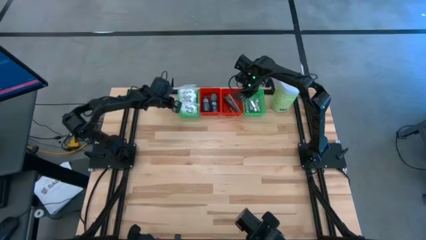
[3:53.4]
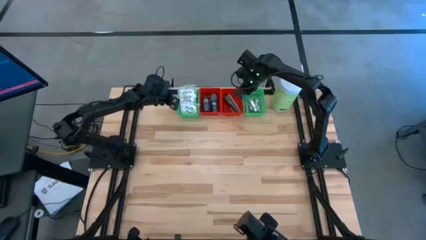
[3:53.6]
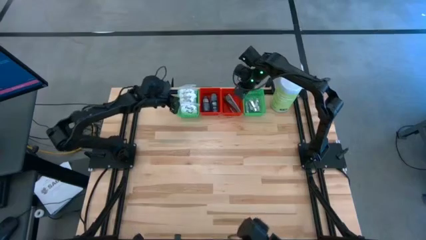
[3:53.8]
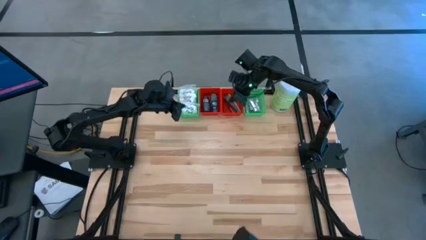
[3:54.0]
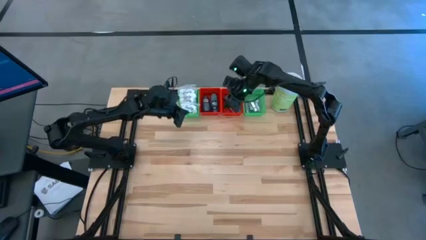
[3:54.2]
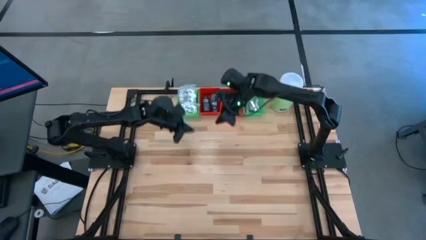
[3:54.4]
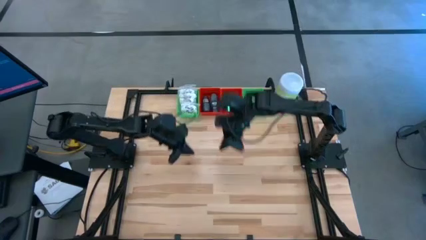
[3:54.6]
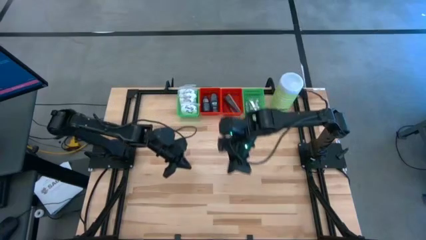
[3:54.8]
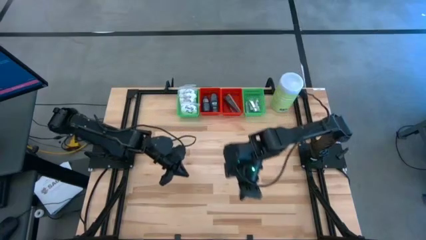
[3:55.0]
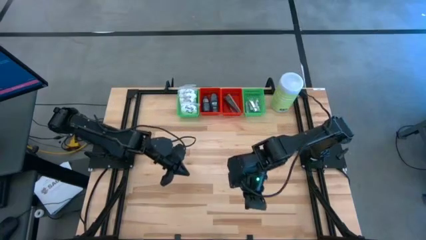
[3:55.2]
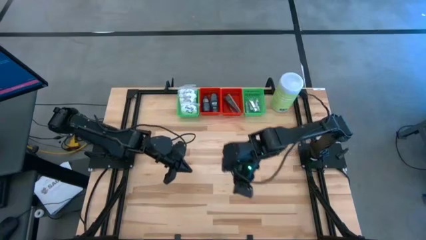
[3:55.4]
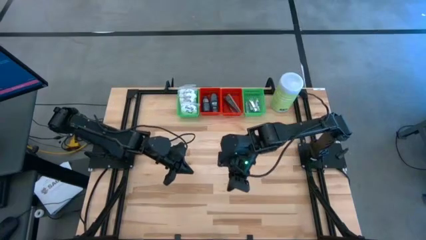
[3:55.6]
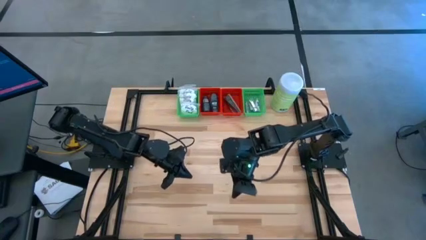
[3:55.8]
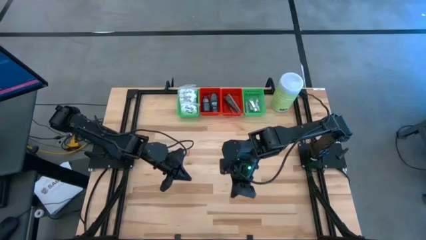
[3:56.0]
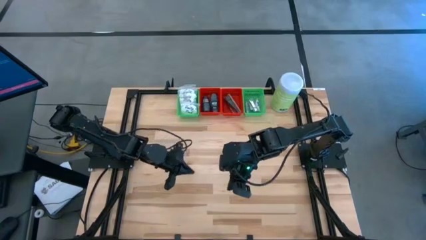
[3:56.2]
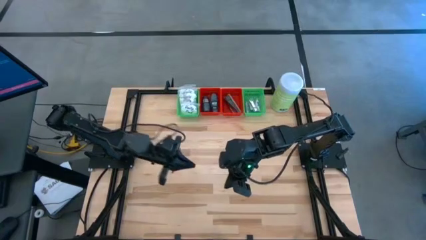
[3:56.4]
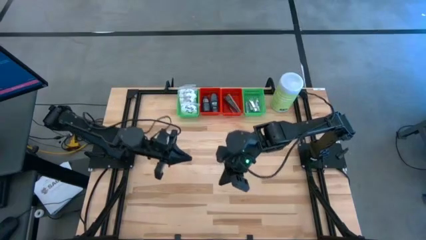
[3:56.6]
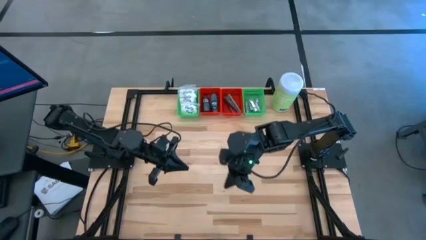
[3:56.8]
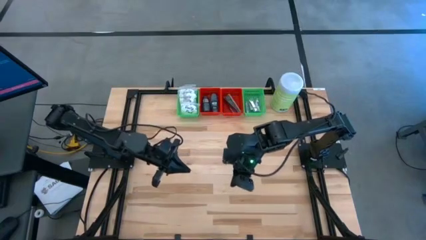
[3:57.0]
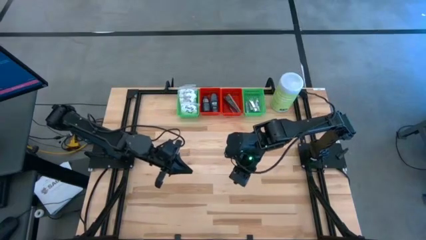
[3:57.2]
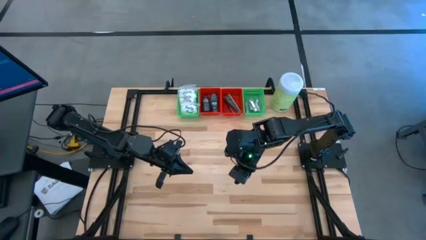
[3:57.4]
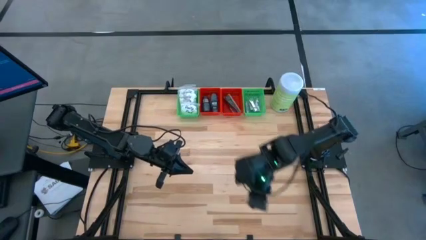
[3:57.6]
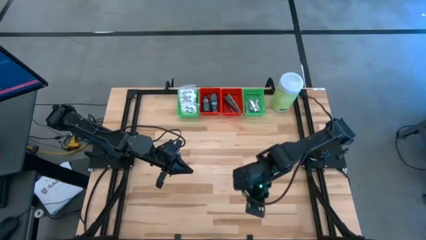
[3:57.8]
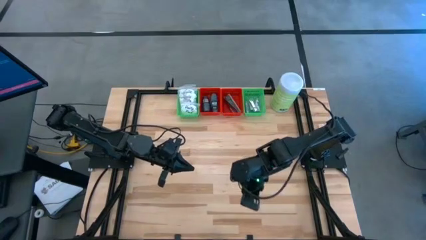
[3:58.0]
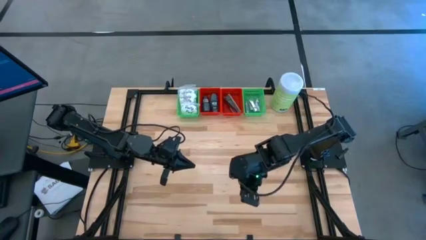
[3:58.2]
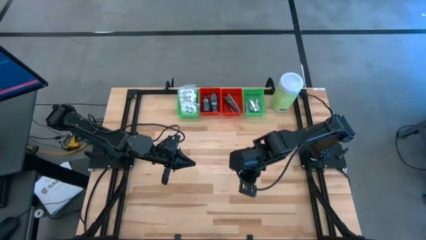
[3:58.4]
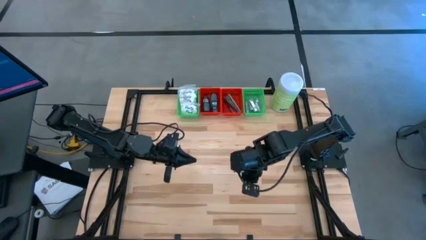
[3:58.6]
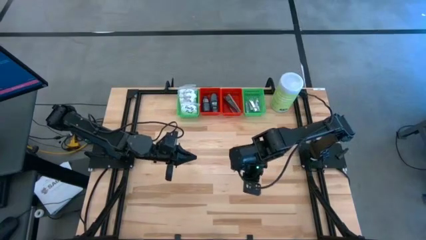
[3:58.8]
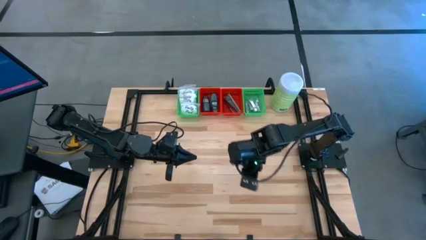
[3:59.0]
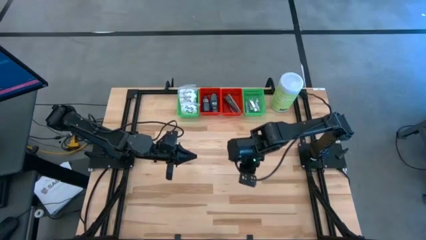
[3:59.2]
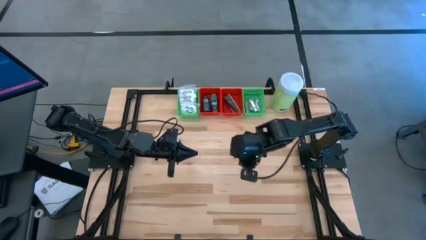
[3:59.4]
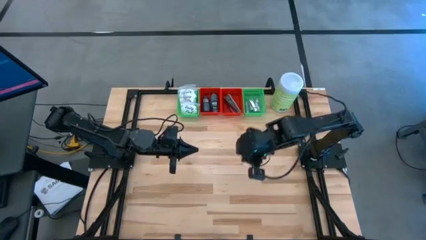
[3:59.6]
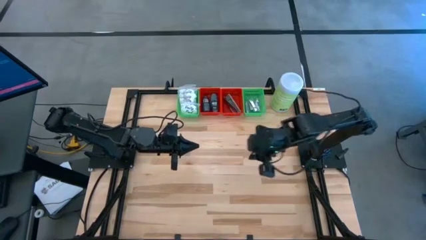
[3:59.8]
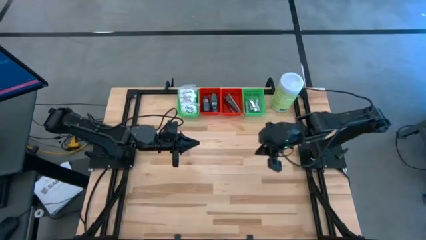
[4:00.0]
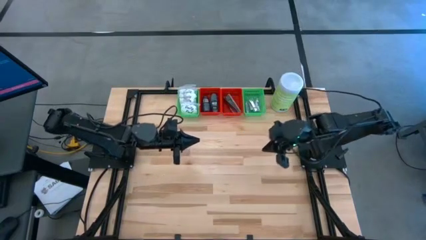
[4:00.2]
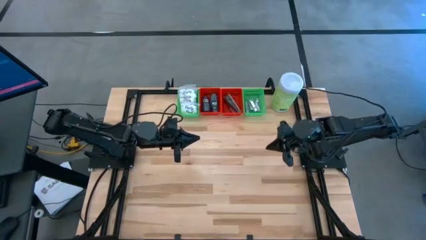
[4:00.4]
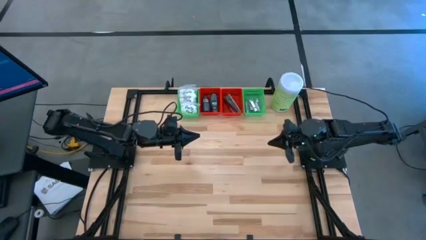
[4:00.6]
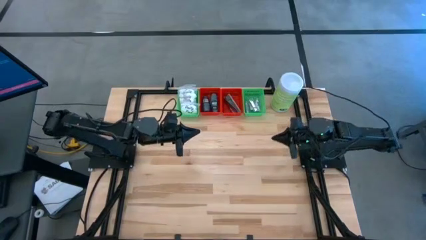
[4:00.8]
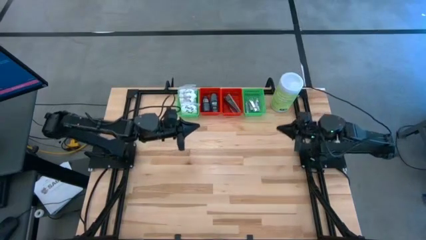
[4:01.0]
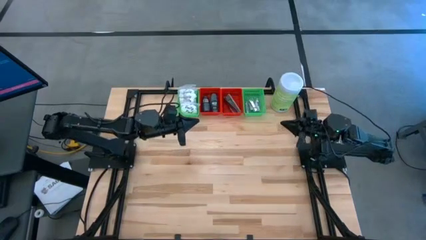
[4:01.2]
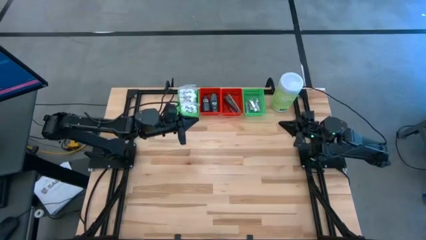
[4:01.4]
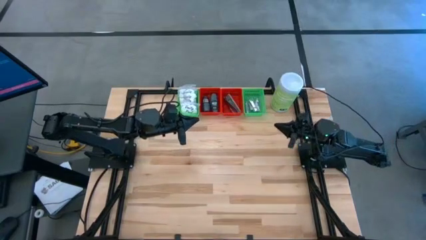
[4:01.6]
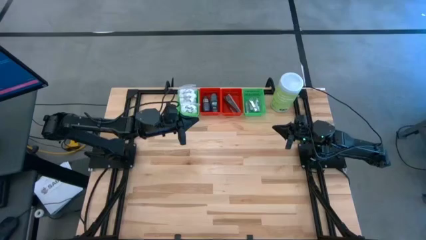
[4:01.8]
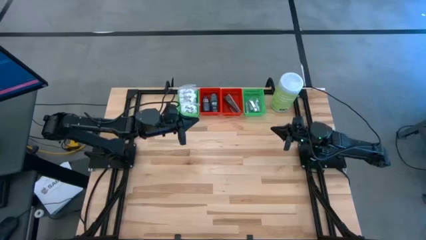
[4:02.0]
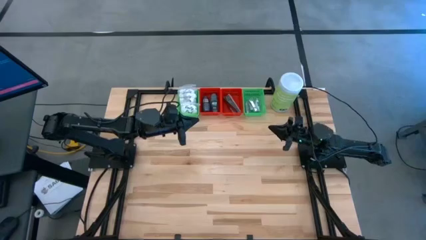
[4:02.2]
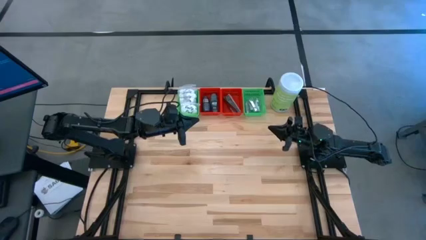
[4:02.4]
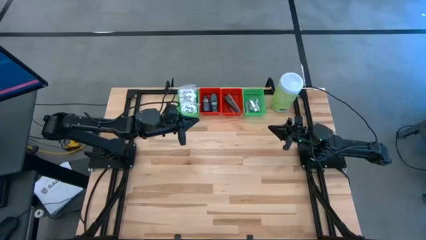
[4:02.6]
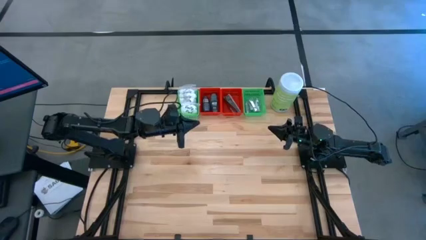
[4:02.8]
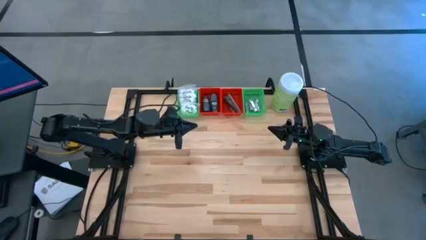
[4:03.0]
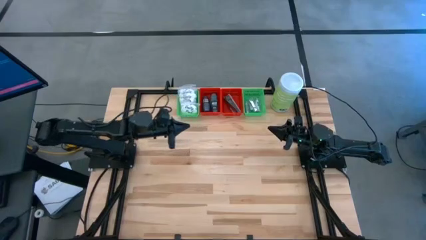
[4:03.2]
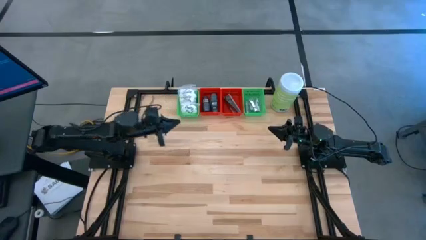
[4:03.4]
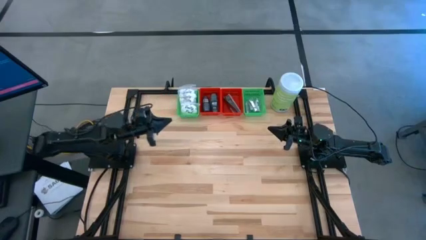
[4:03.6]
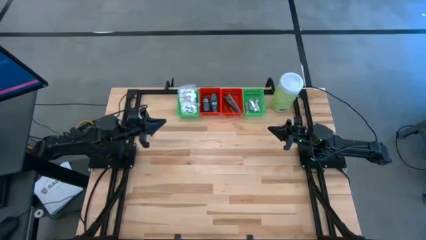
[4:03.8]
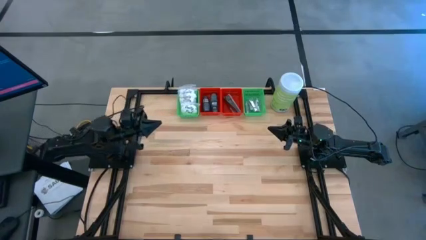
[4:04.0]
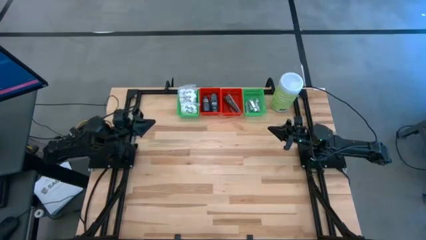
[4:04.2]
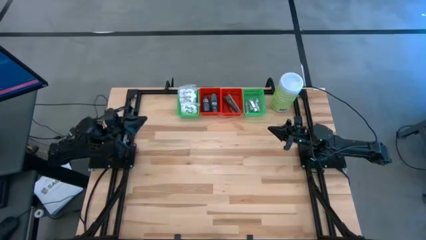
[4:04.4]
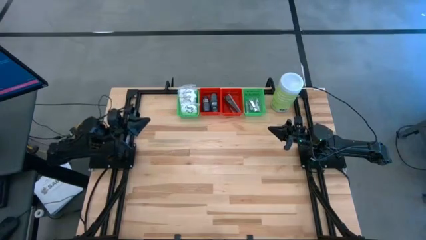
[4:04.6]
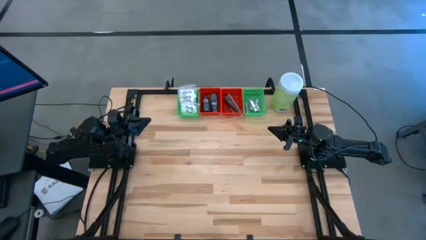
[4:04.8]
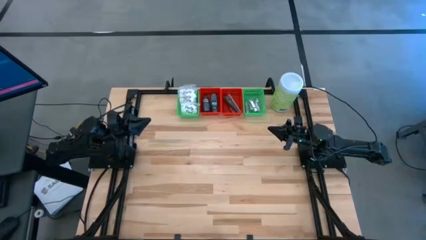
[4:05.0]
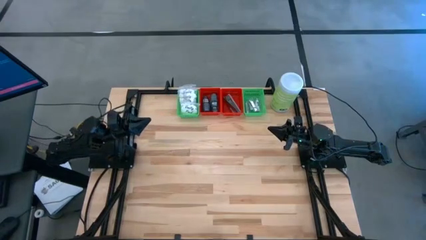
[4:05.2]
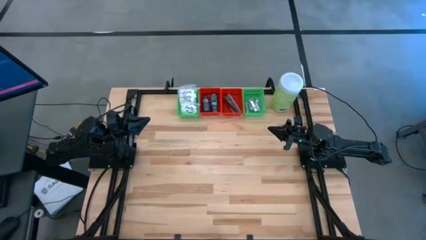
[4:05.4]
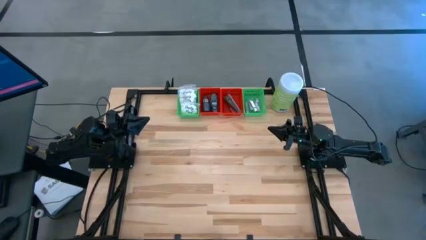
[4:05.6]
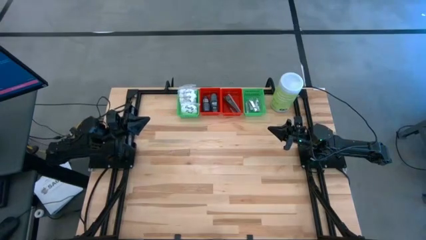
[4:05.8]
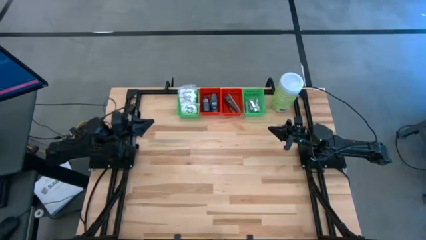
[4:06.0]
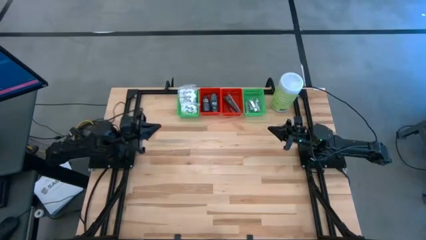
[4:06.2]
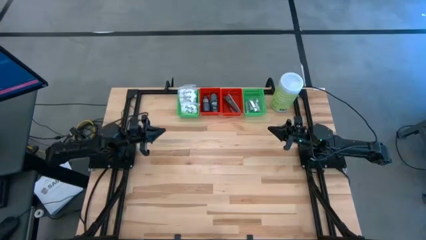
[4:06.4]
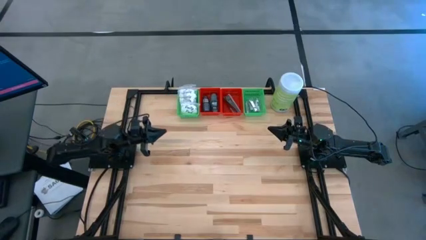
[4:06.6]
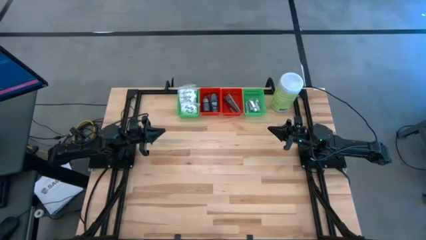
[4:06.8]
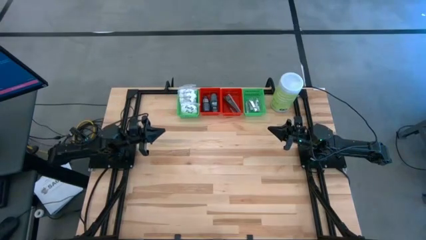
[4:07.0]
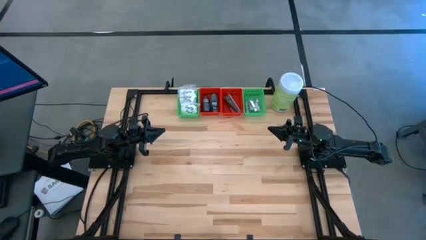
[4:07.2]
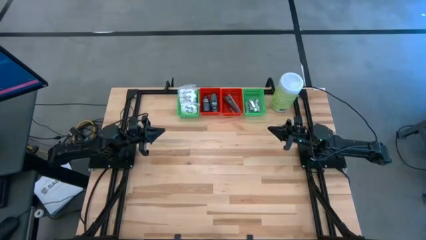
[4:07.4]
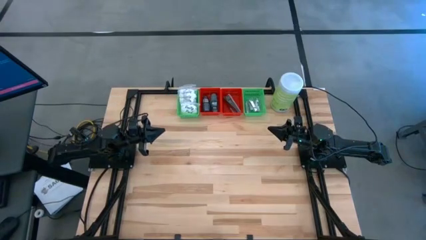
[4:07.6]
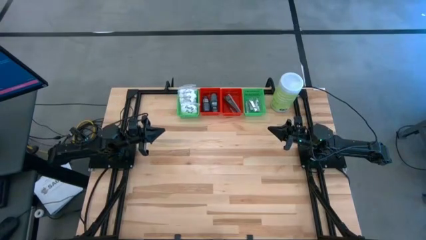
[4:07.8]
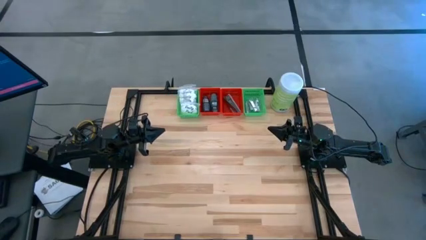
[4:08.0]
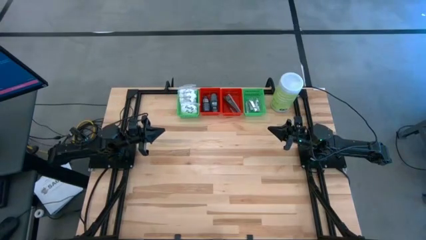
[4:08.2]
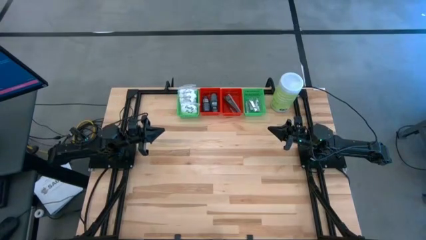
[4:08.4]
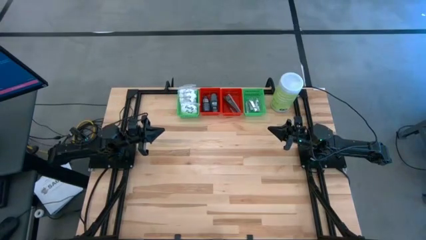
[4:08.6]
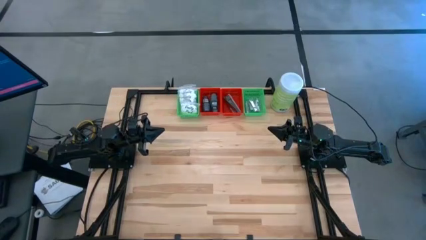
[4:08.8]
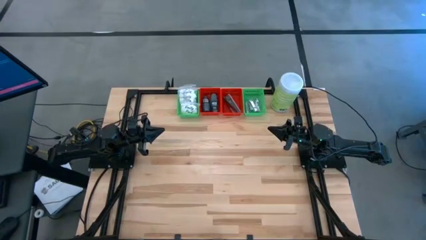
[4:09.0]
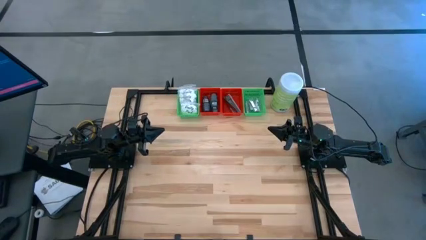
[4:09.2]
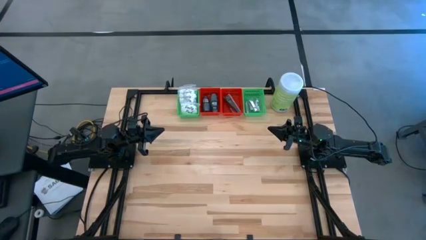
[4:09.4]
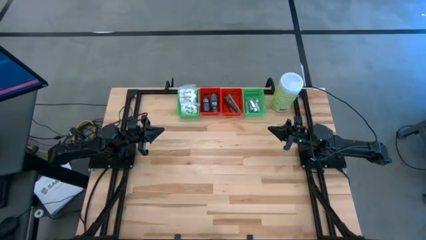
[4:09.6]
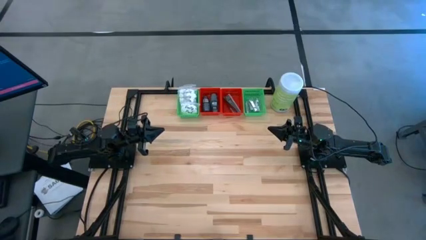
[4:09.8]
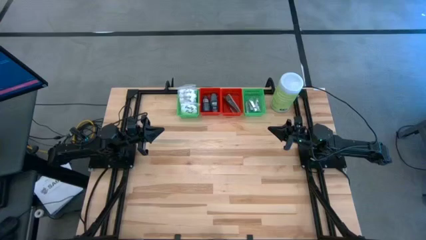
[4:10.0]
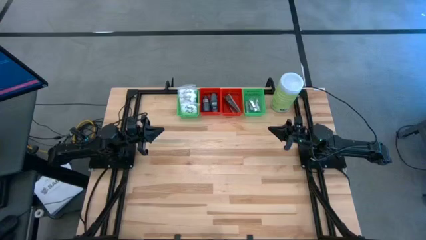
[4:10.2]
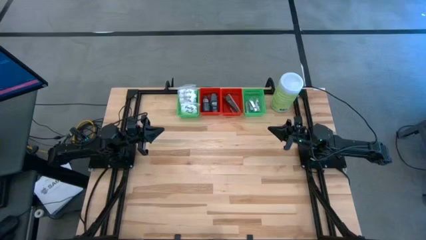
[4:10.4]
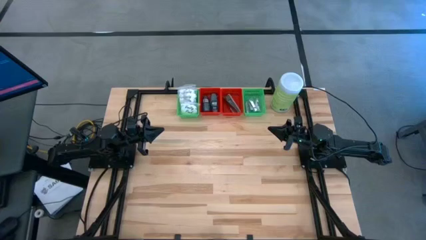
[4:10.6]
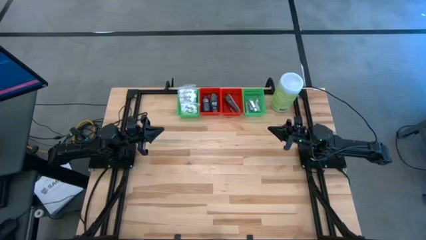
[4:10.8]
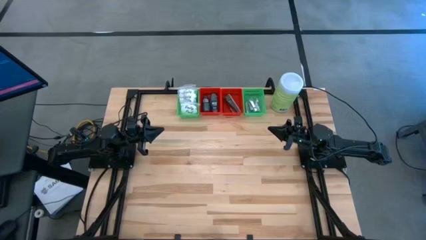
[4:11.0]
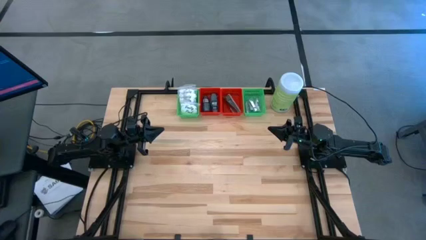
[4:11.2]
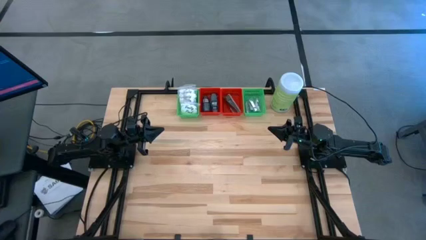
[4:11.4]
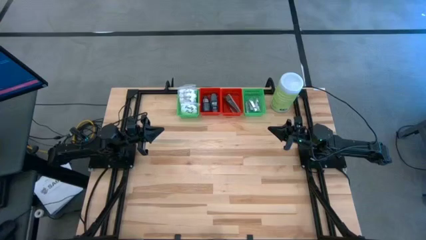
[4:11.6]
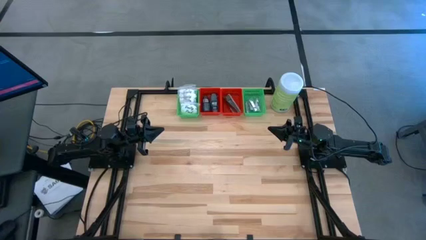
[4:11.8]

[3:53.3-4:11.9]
Task: Pick & Place Travel size toiletries
Return to Home Position
